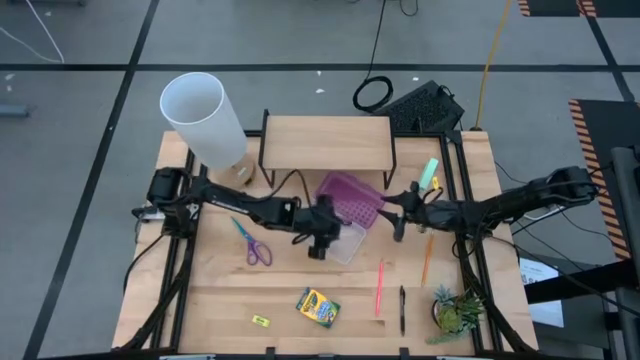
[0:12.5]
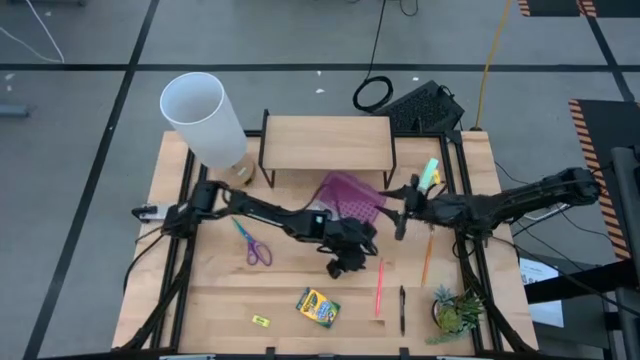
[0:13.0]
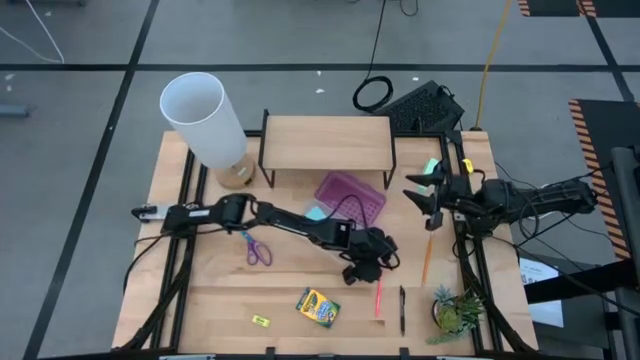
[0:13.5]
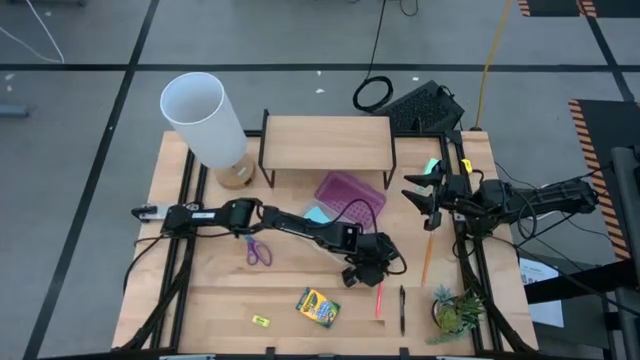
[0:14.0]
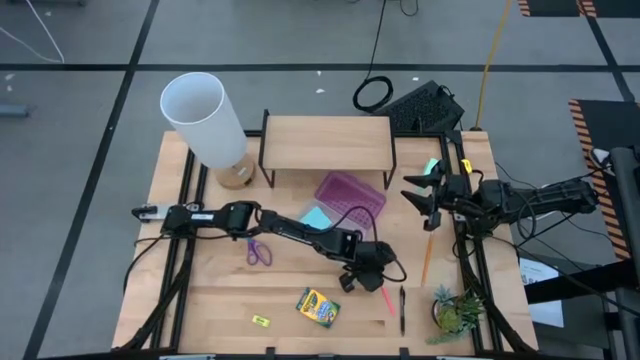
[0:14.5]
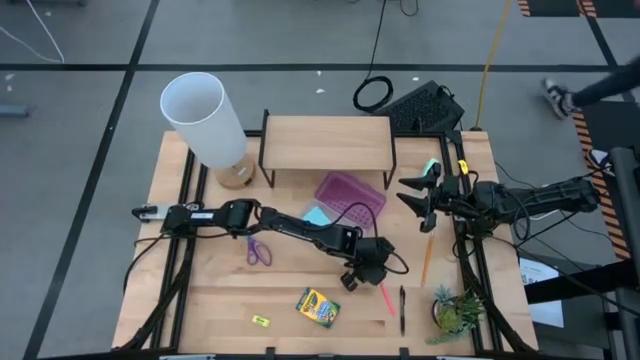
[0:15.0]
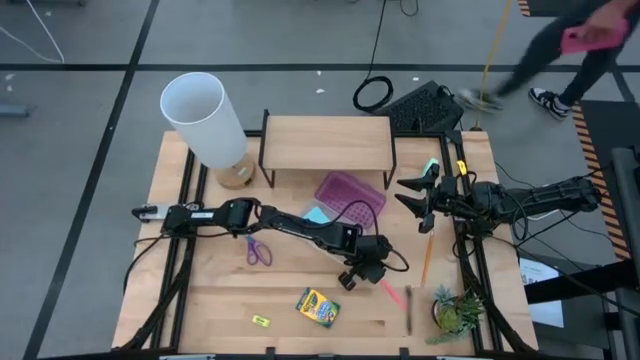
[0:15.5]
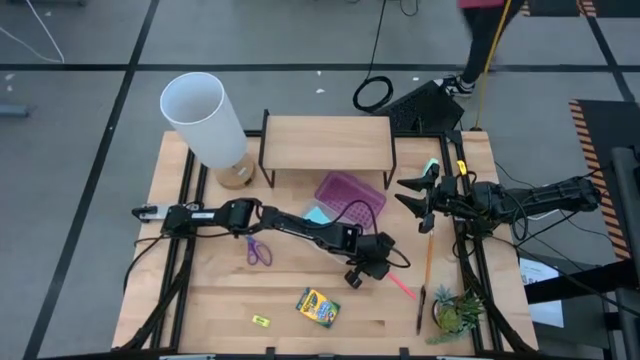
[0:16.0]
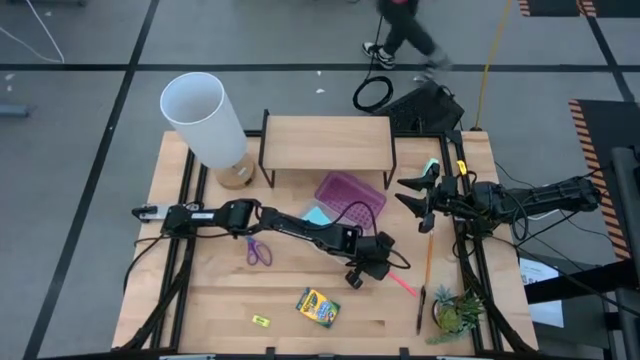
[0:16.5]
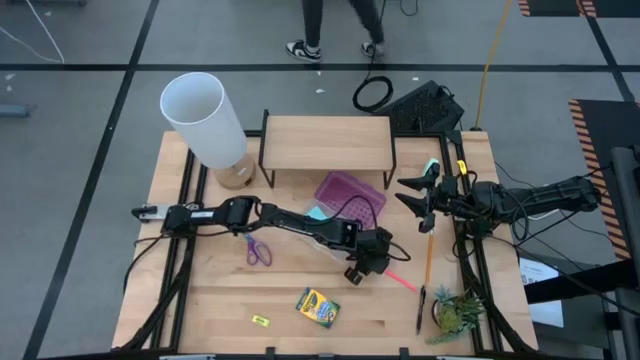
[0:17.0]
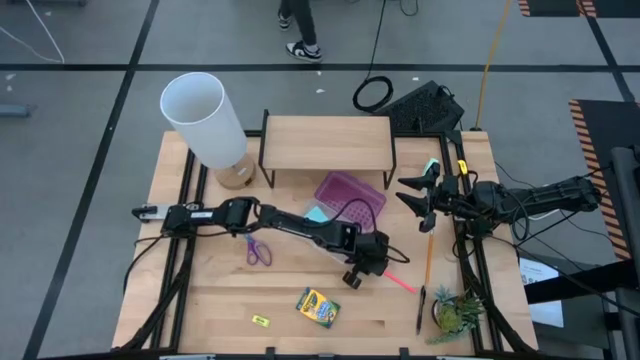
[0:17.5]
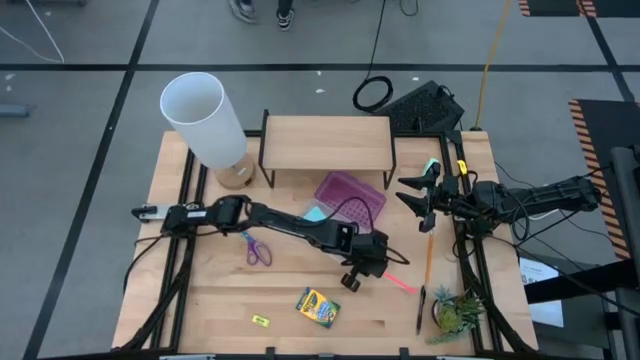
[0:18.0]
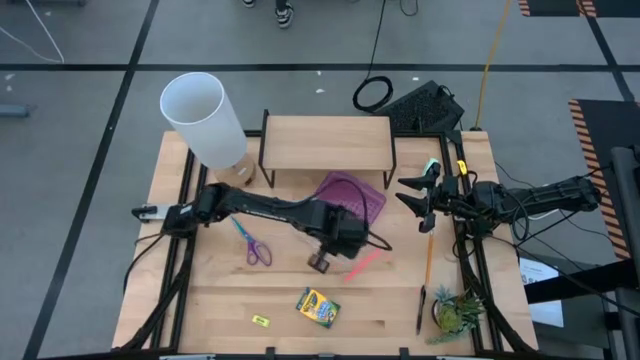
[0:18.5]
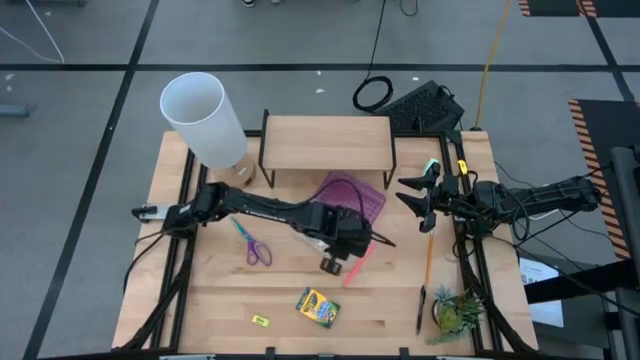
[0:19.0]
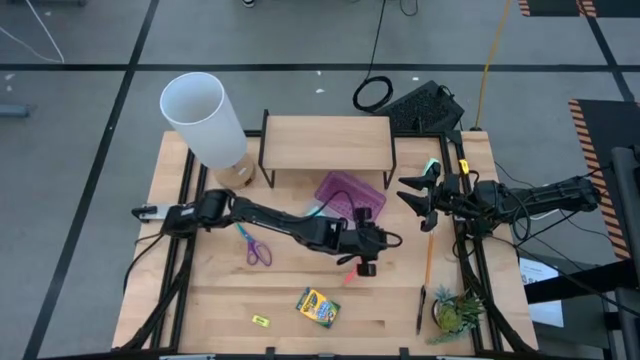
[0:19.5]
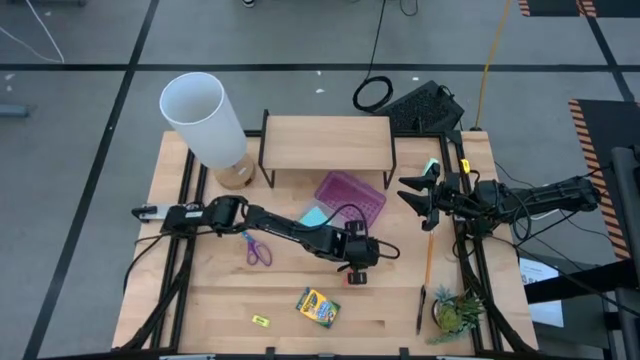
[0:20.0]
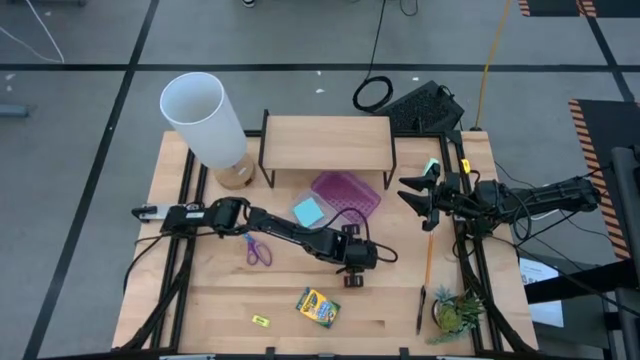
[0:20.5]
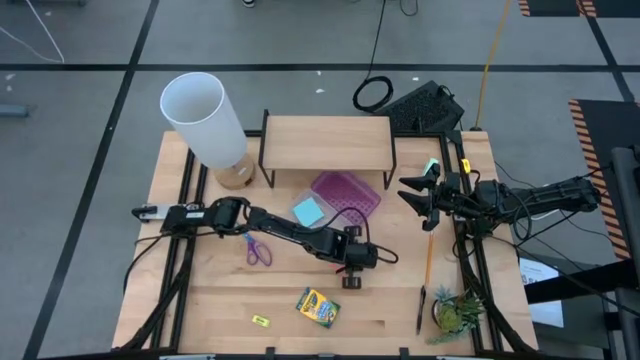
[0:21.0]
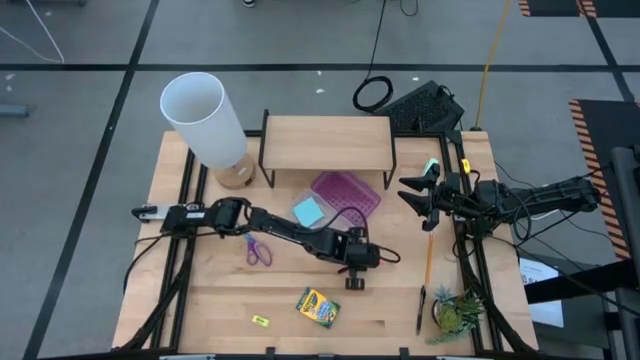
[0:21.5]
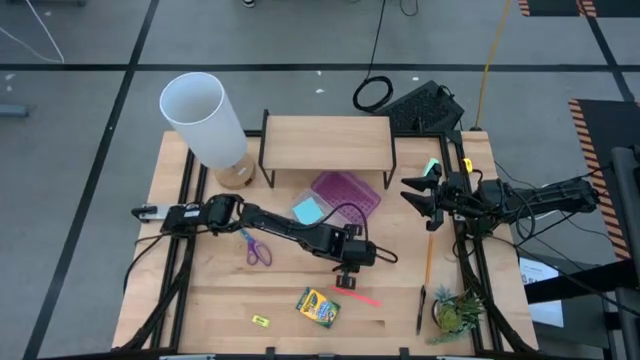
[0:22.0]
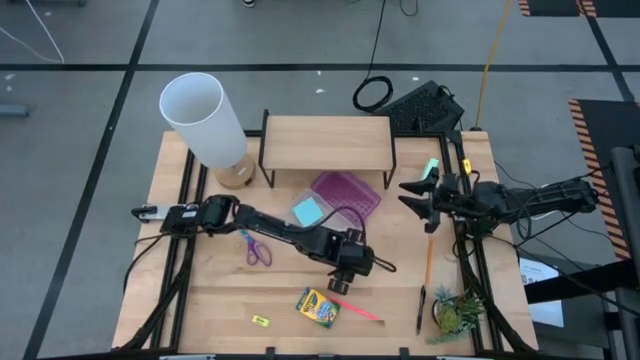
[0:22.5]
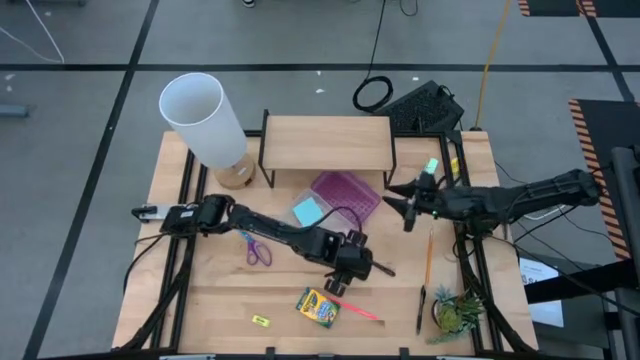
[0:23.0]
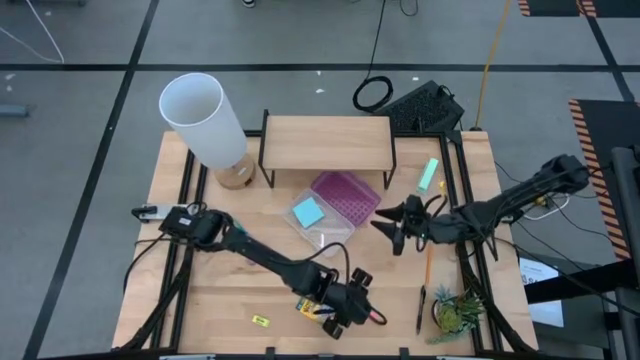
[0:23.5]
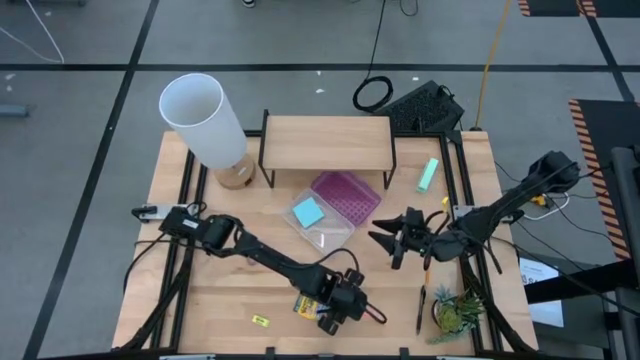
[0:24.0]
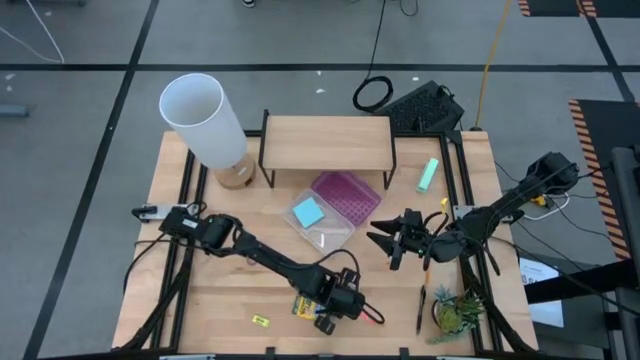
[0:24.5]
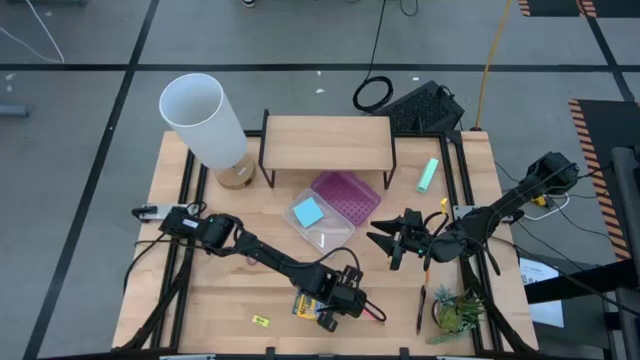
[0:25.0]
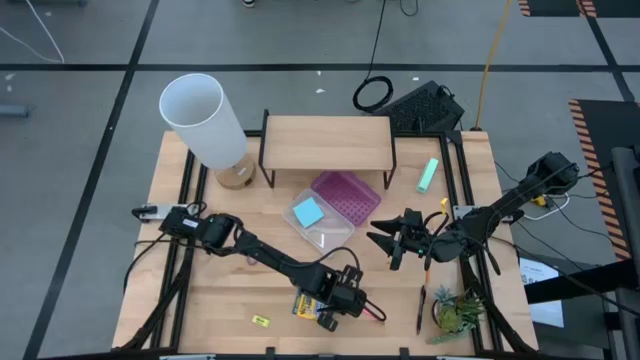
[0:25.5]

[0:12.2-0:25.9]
Task: Pack school essentials
Put the pink pencil into the supply box

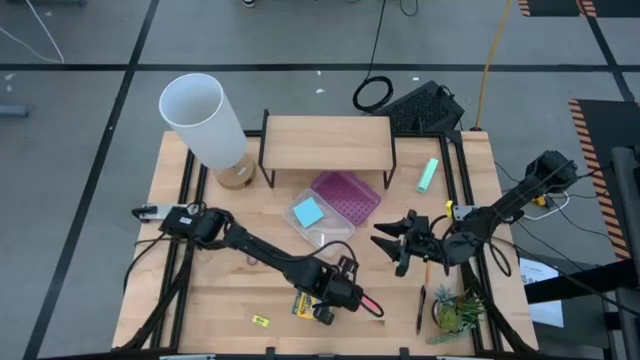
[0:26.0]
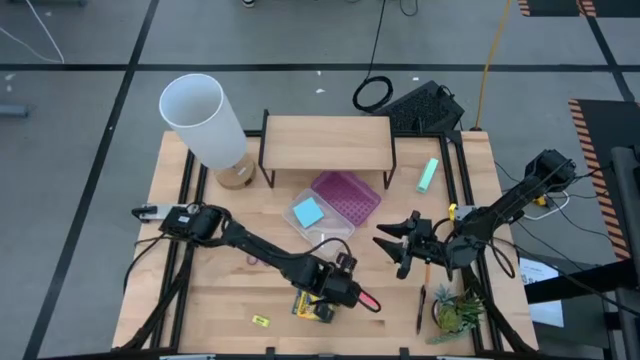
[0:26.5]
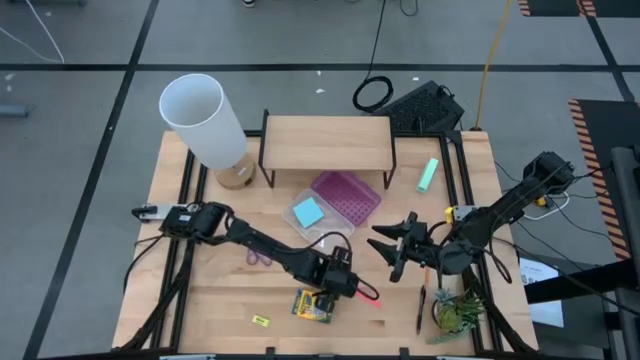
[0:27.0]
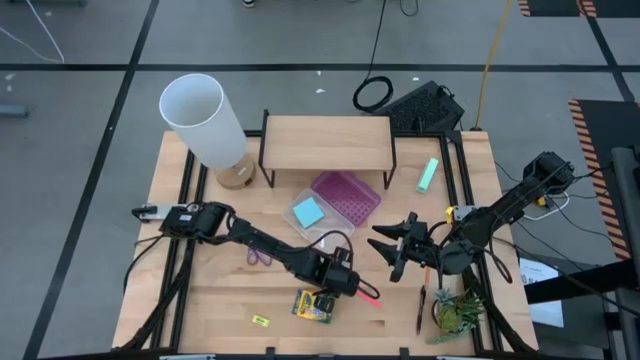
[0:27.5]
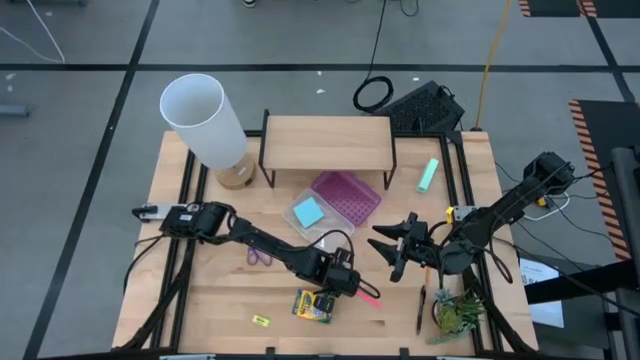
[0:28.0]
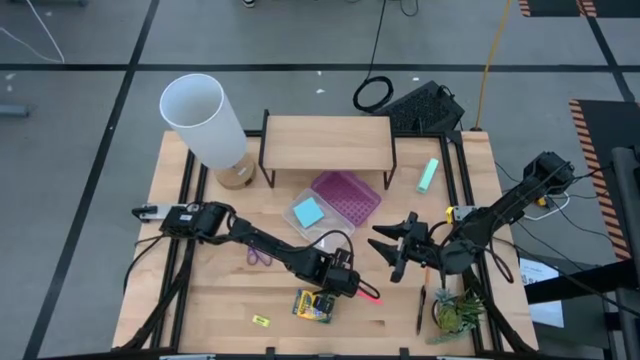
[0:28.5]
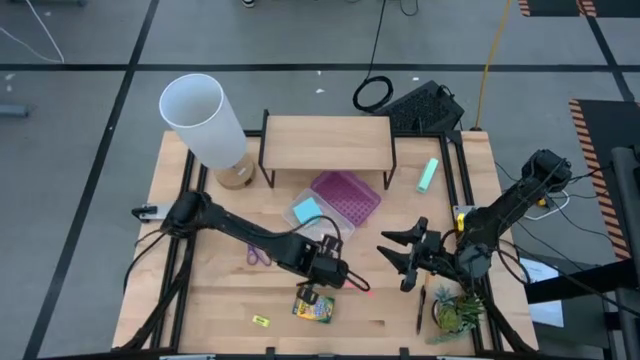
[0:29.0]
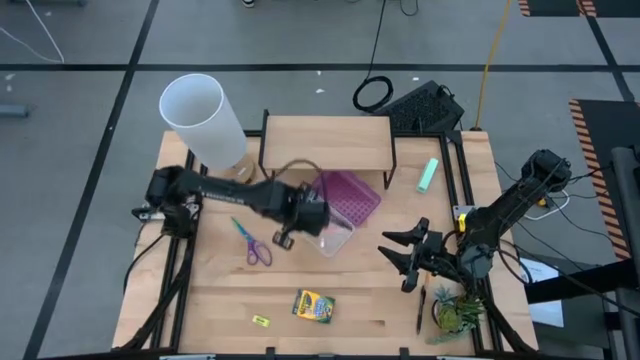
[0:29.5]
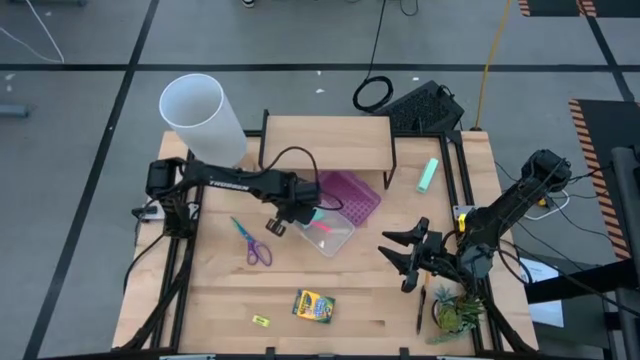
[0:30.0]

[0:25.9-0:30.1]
Put the pink pencil into the supply box
